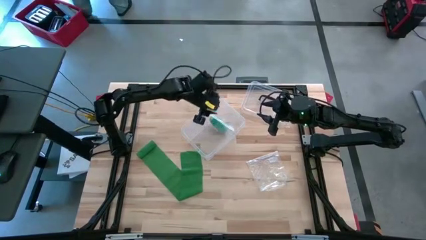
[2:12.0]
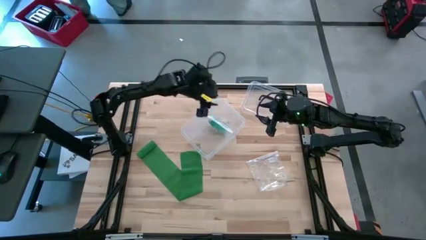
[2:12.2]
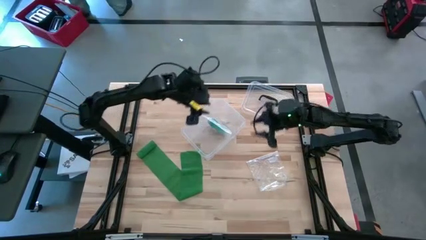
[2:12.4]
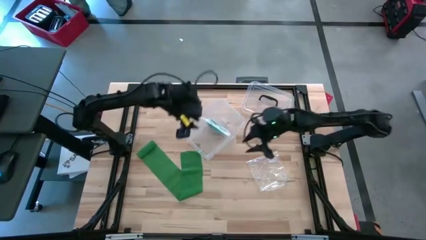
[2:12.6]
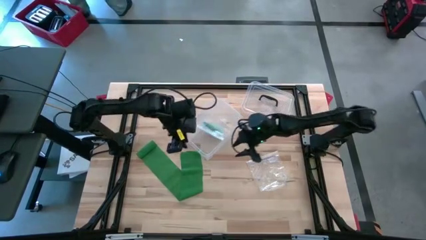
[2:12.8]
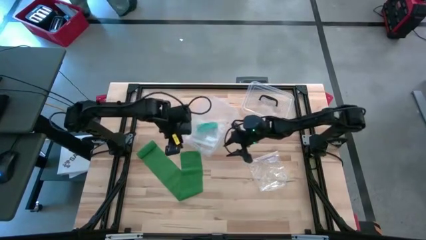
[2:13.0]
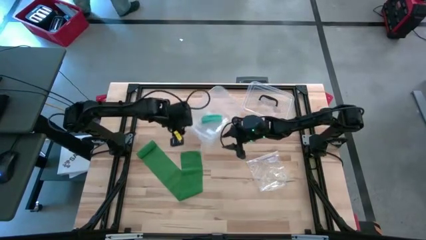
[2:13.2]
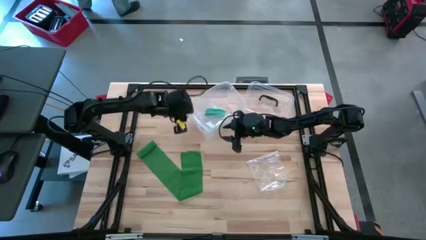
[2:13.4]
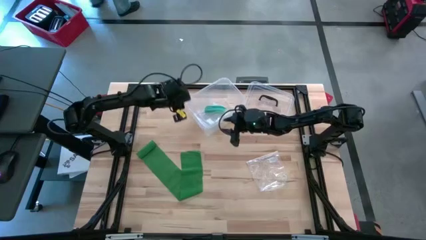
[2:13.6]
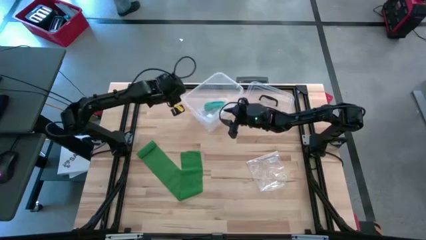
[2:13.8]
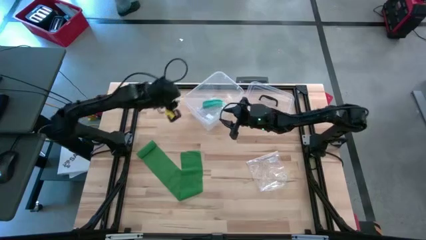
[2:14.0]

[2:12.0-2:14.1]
Task: Roll bandage
Move the transparent storage box to the top center of the table

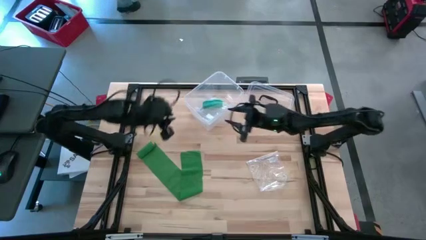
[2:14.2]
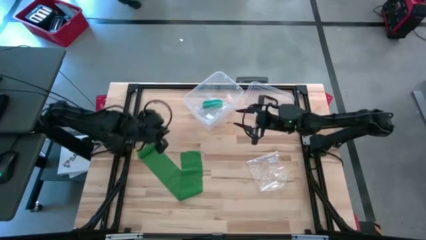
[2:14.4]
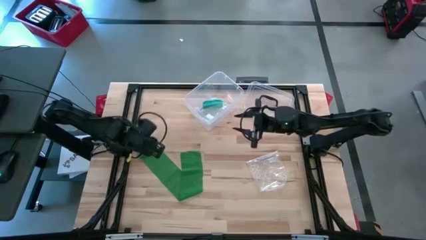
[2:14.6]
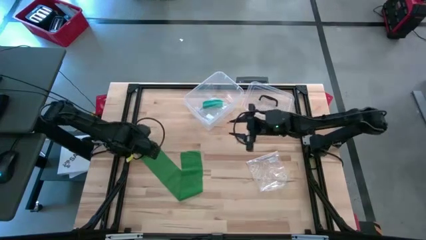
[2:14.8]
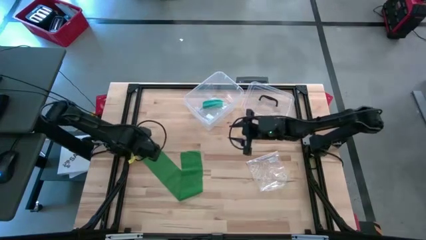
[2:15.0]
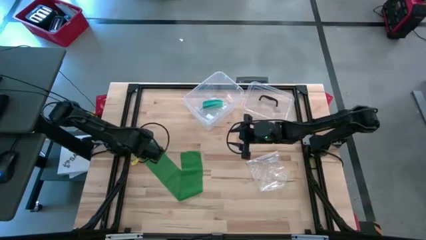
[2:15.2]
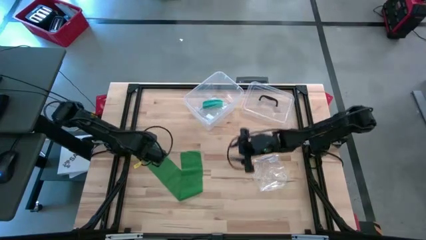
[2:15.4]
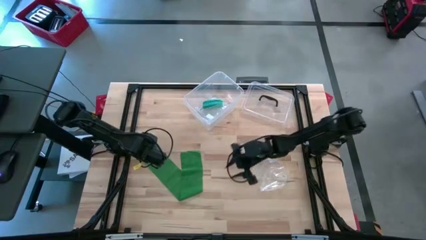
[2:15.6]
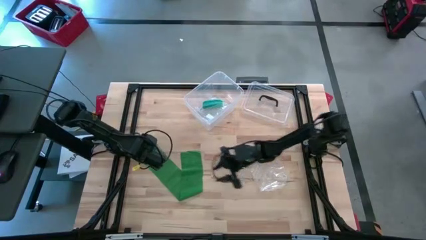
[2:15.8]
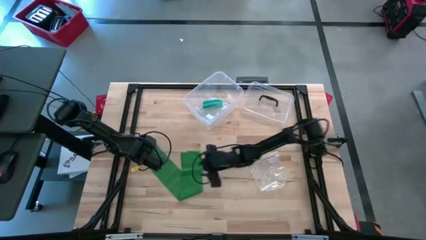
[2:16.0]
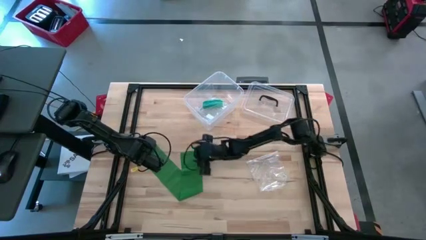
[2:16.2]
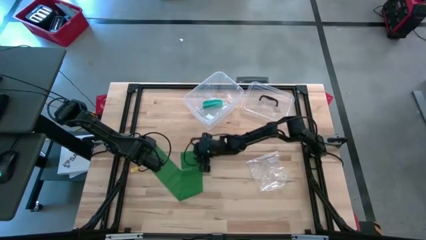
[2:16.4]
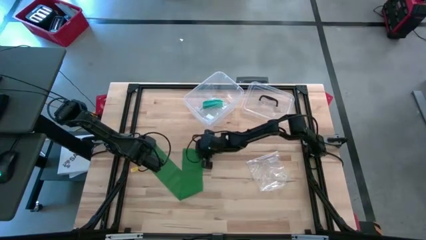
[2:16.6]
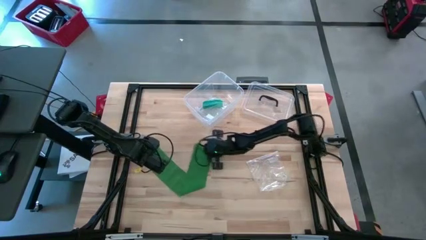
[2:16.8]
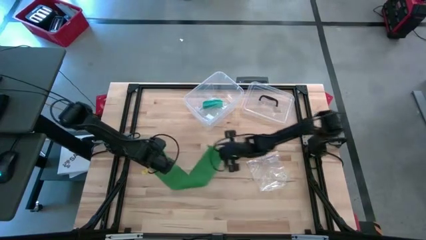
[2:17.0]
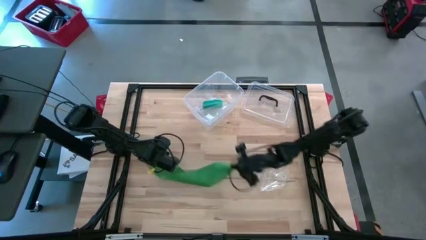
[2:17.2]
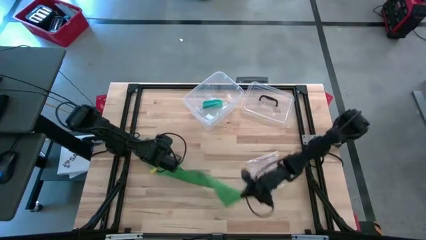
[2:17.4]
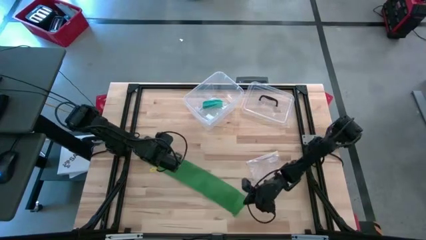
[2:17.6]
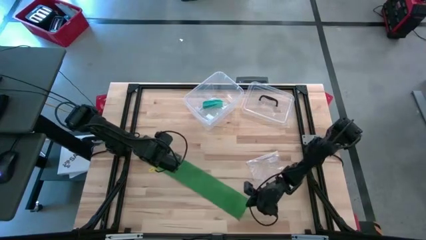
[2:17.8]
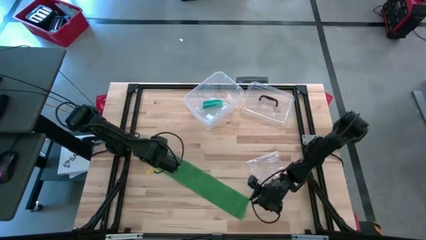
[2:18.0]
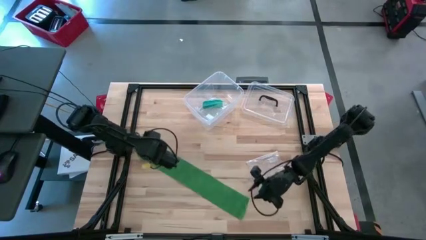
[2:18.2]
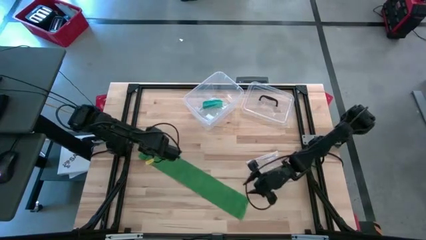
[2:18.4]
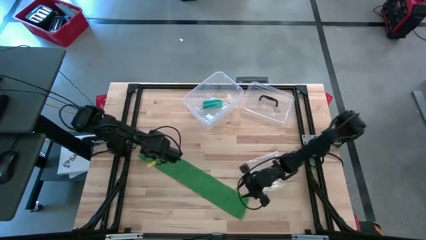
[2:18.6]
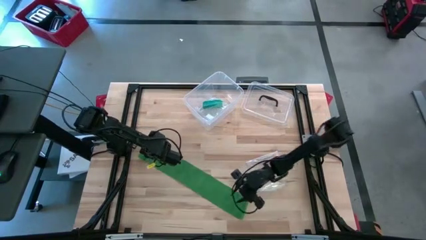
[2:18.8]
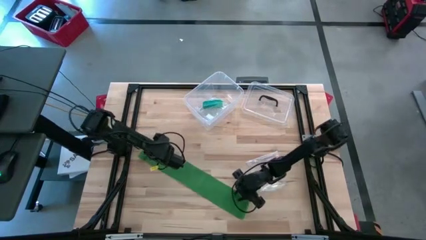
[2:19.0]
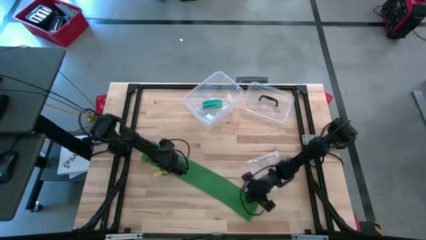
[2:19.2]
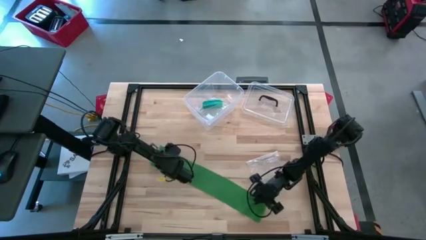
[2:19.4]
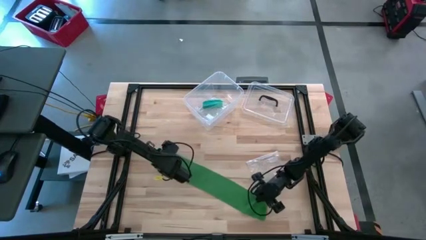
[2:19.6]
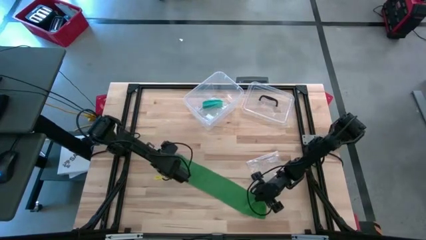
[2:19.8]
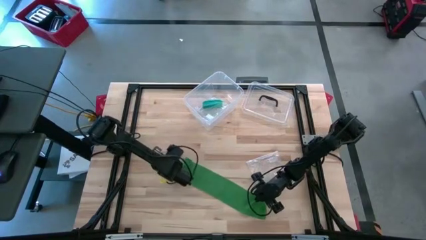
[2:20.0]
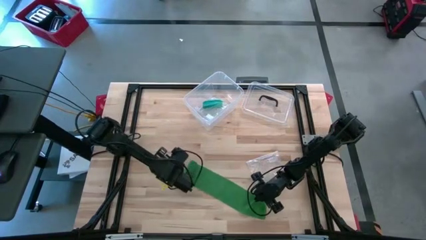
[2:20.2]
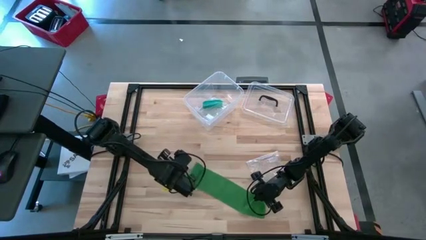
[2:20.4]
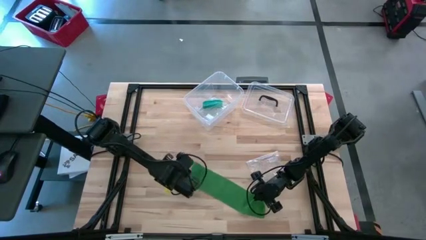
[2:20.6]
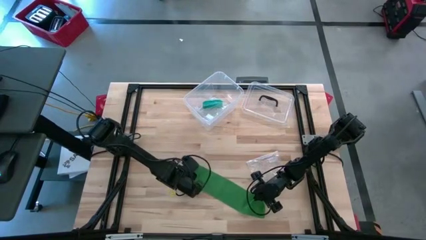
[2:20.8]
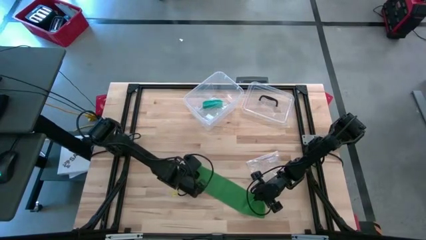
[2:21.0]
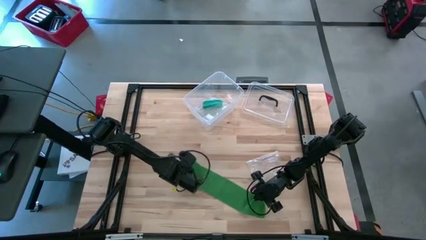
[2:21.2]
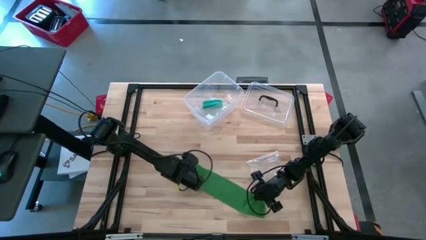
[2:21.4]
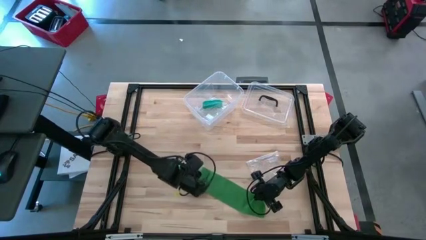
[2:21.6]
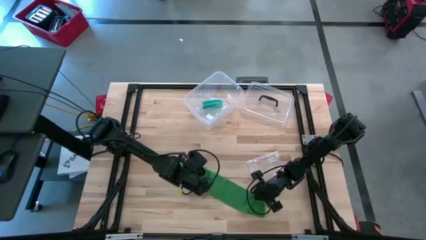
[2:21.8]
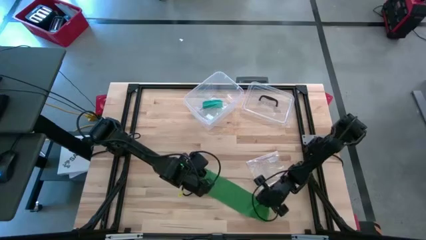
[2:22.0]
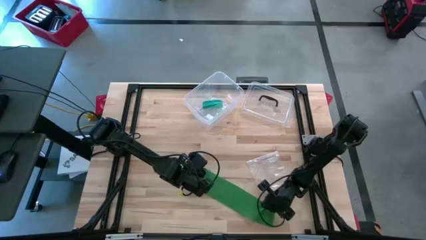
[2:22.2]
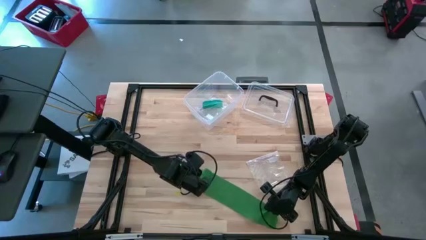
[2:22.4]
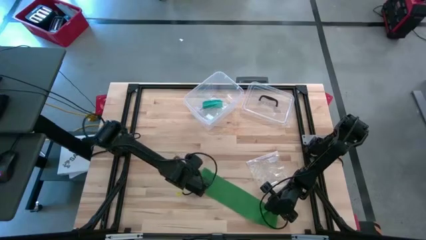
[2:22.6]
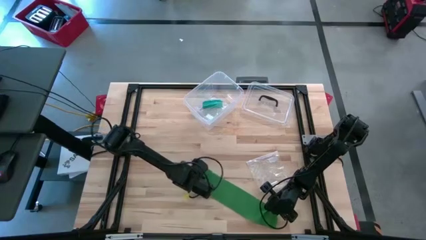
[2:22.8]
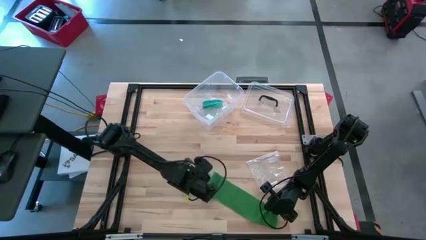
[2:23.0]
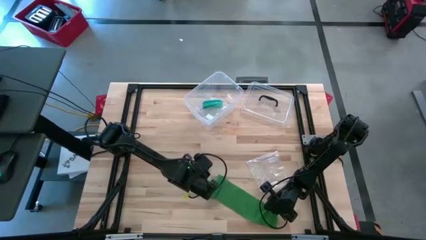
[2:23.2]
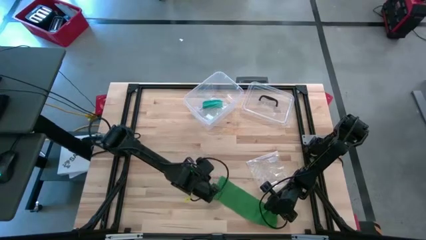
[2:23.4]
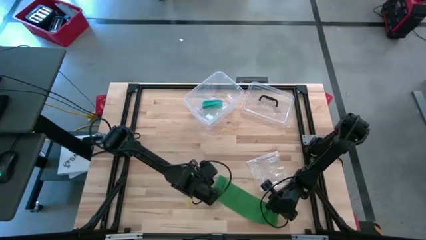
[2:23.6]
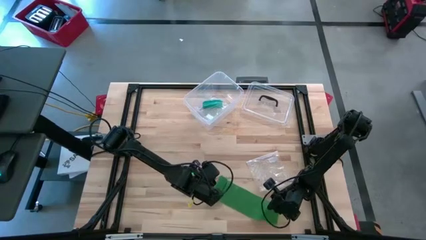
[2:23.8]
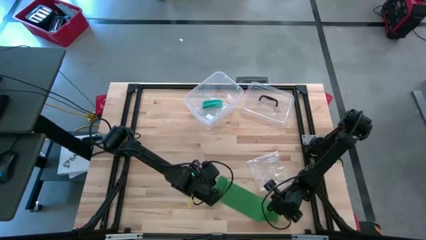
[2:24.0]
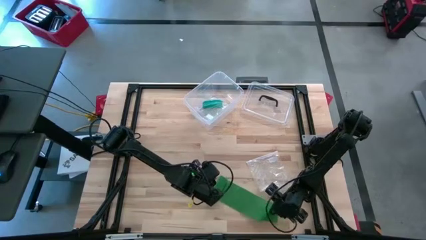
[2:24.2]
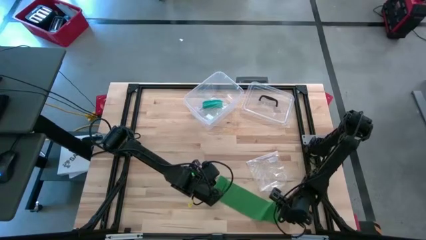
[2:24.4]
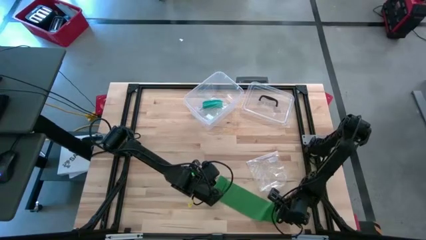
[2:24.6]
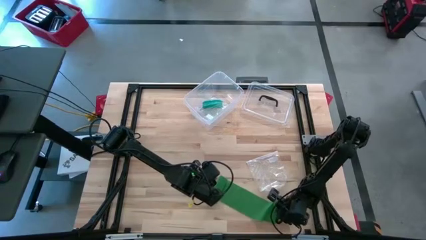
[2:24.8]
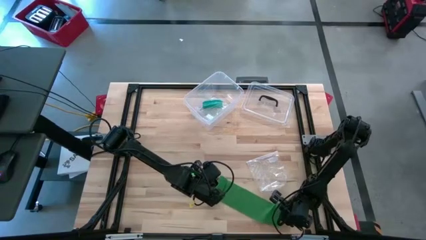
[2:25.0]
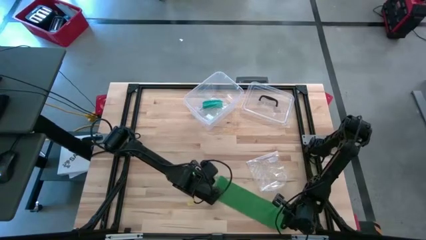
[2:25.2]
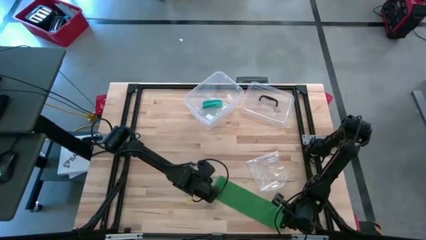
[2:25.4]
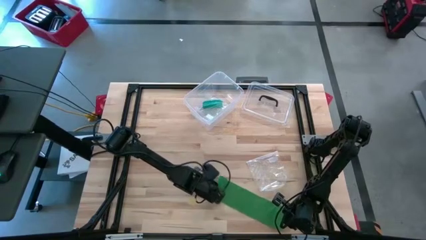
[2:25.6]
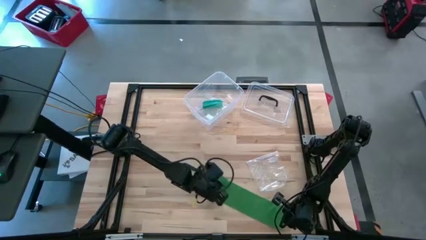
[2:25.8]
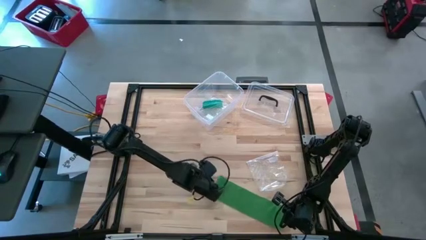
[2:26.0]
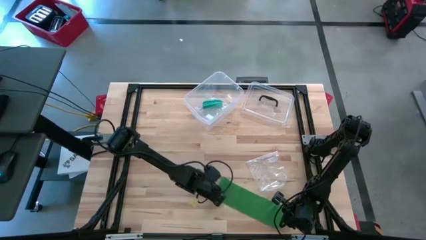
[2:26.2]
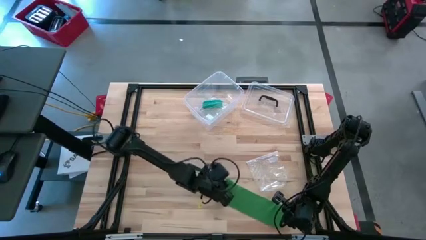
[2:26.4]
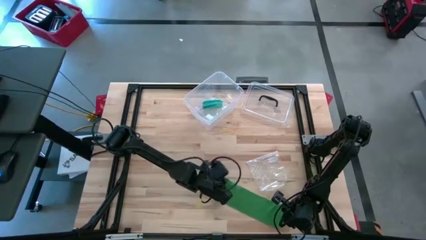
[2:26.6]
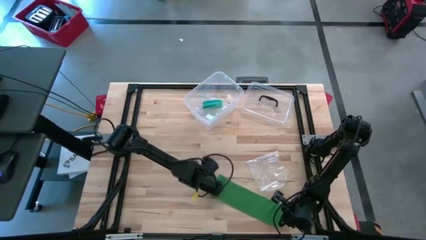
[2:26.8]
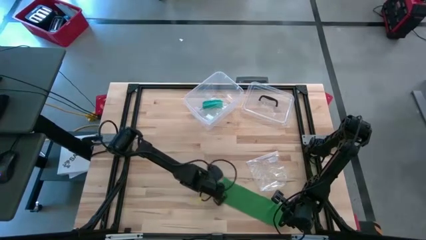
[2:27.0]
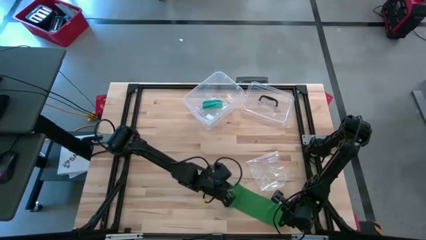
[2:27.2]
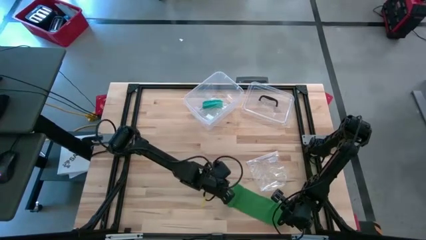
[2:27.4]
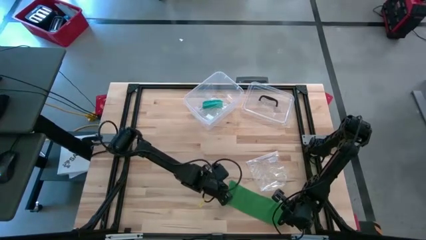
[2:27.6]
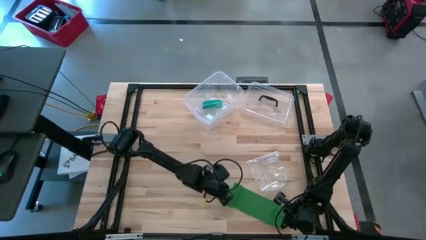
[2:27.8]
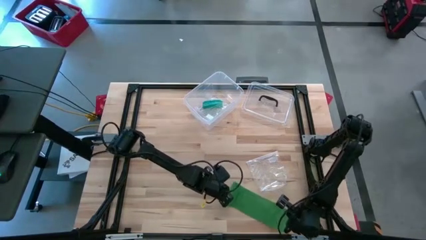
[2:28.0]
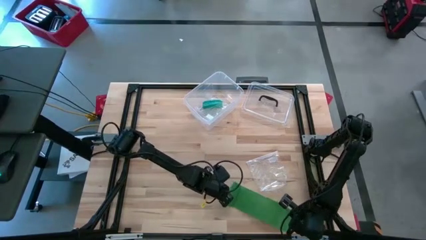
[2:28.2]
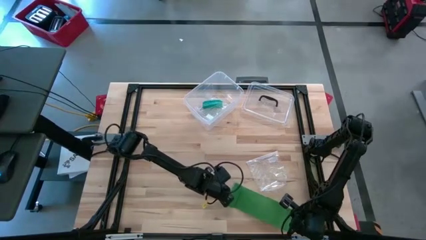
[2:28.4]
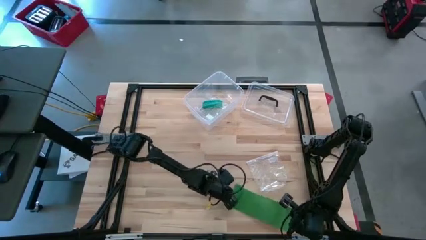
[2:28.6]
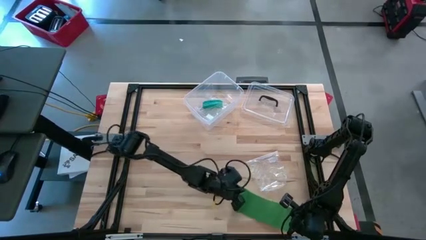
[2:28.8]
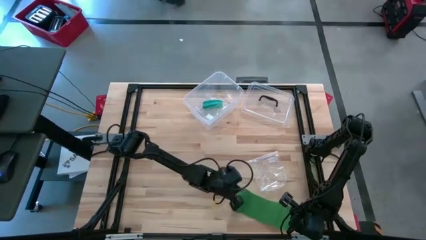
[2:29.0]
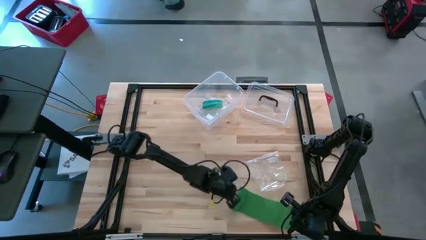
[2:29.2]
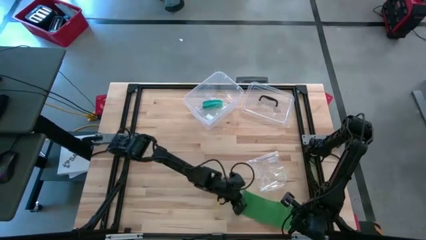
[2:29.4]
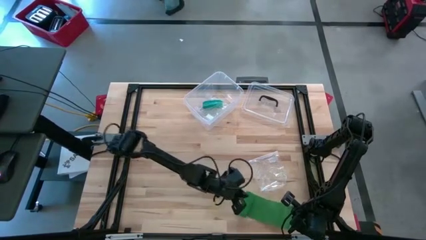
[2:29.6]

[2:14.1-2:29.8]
Roll the green bandage
